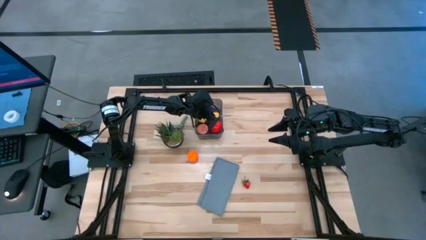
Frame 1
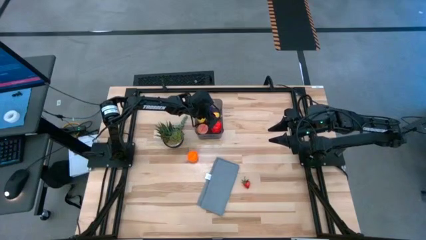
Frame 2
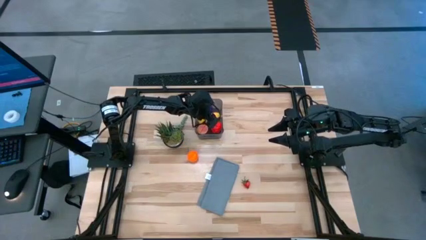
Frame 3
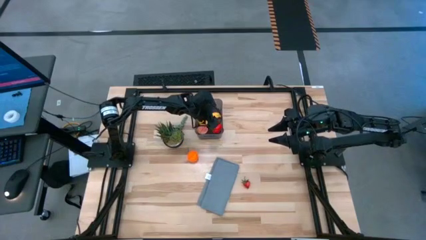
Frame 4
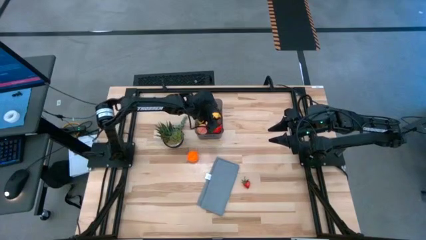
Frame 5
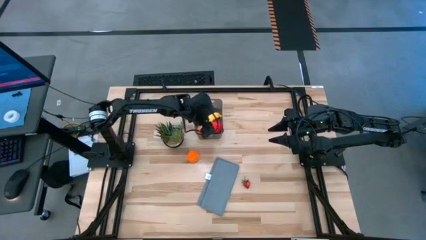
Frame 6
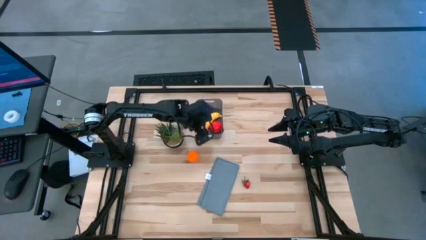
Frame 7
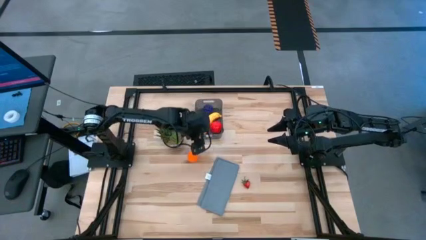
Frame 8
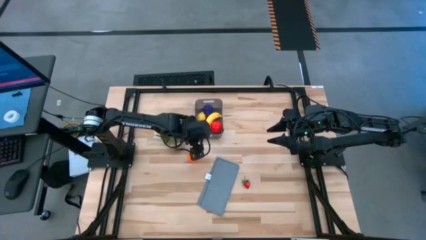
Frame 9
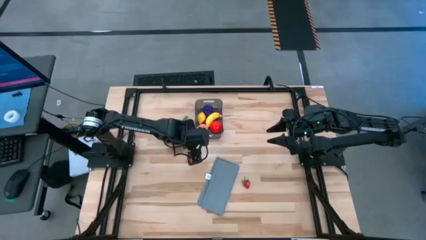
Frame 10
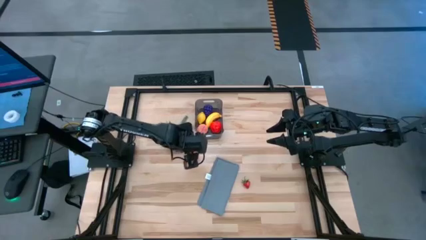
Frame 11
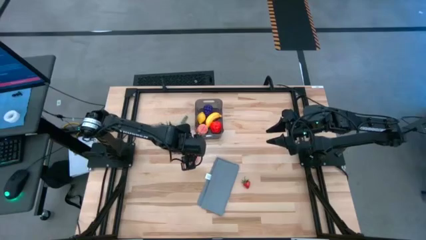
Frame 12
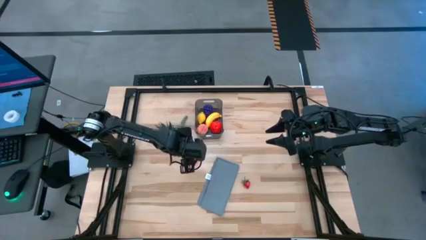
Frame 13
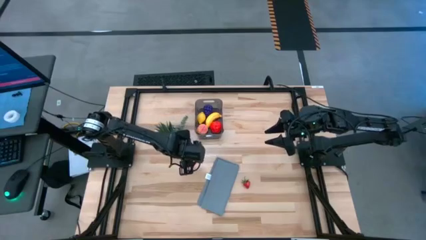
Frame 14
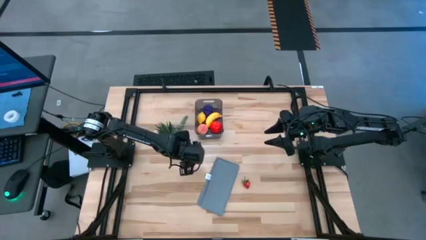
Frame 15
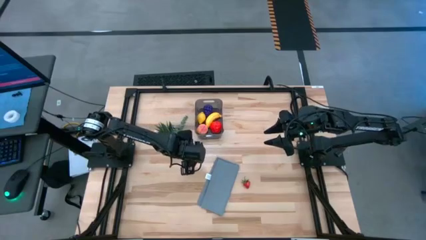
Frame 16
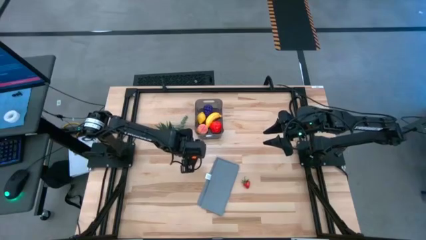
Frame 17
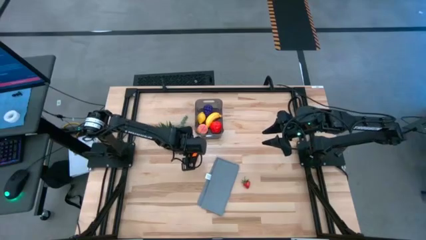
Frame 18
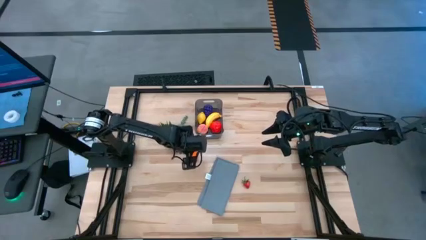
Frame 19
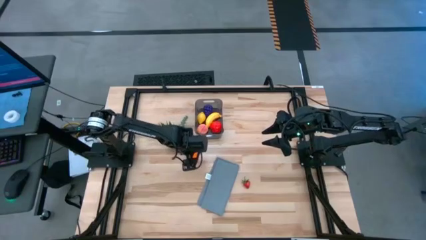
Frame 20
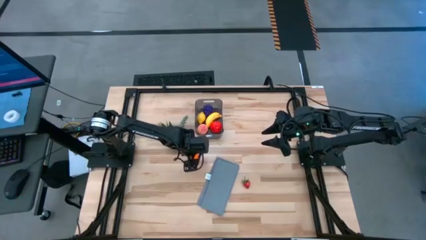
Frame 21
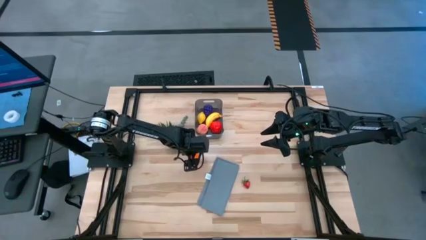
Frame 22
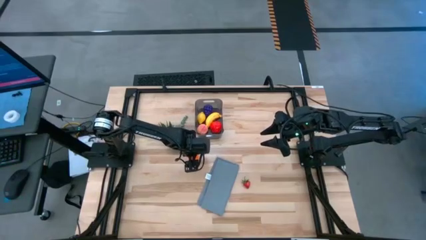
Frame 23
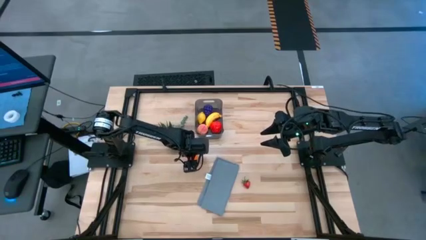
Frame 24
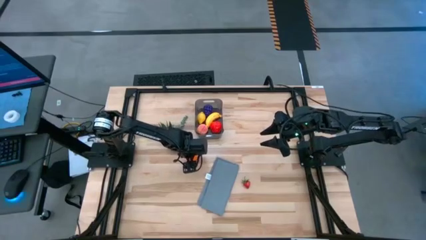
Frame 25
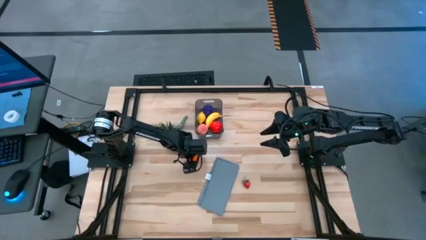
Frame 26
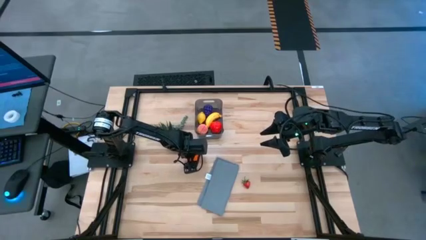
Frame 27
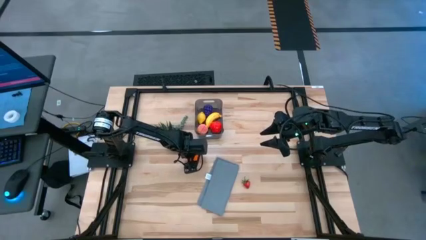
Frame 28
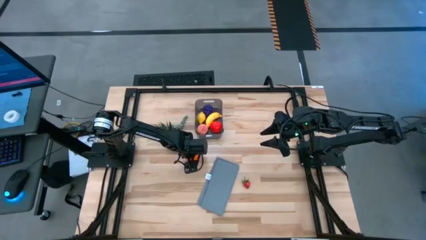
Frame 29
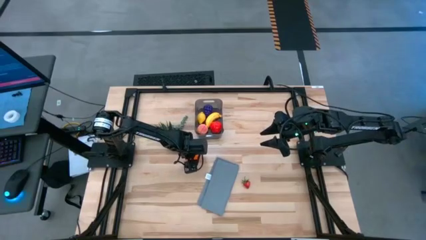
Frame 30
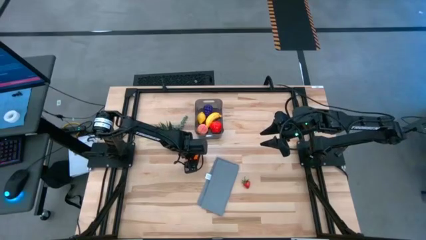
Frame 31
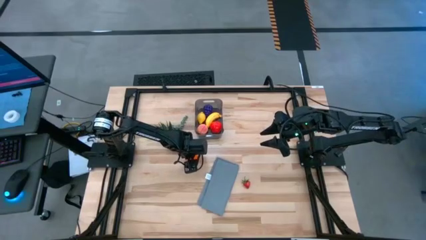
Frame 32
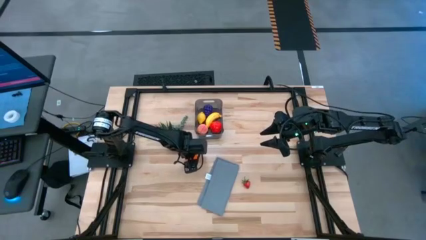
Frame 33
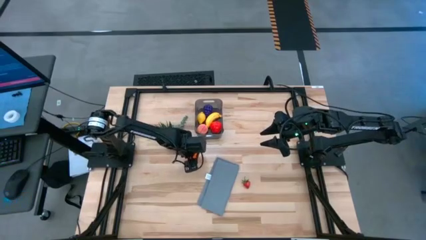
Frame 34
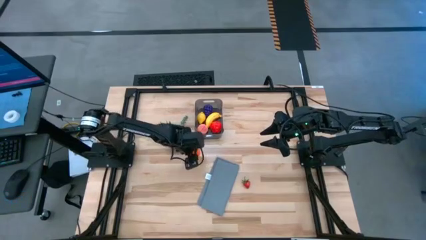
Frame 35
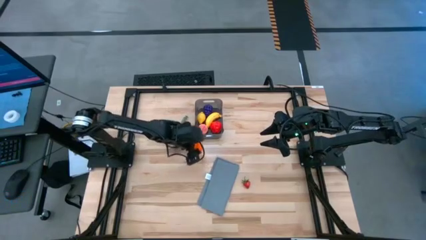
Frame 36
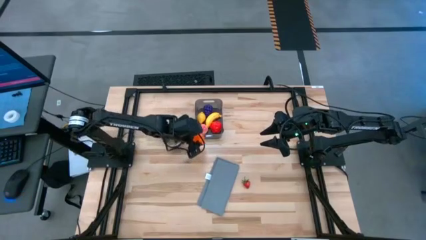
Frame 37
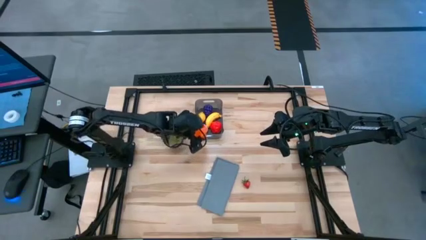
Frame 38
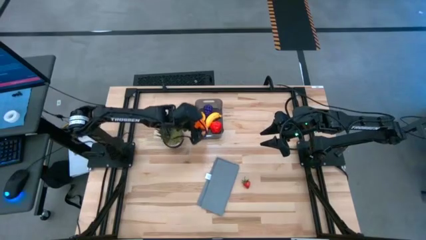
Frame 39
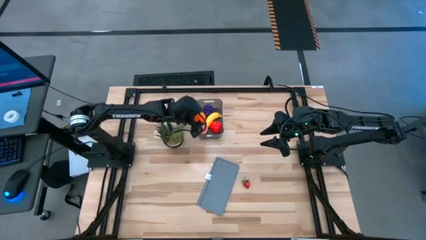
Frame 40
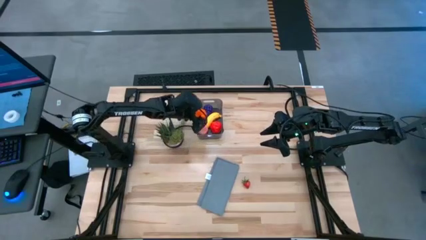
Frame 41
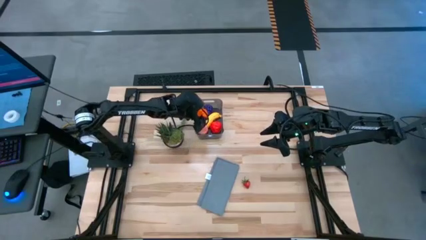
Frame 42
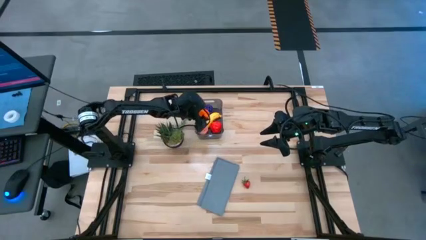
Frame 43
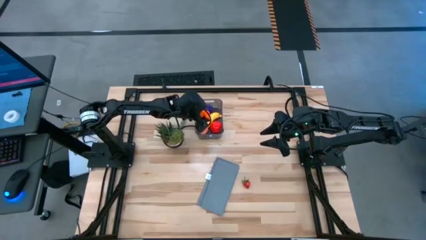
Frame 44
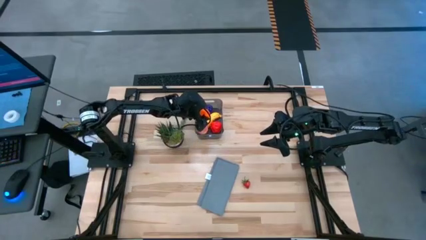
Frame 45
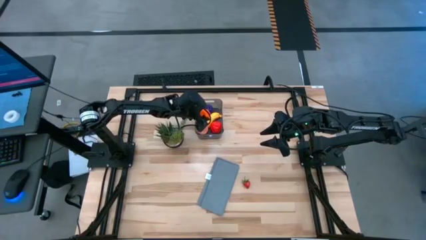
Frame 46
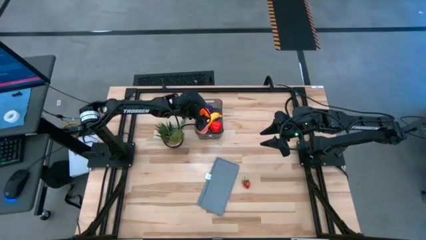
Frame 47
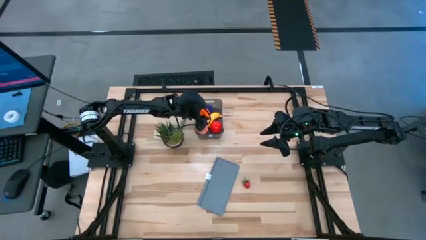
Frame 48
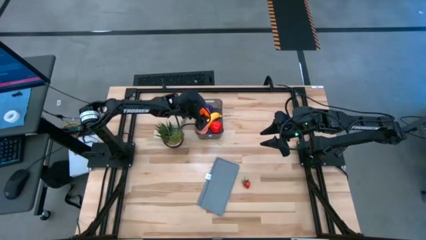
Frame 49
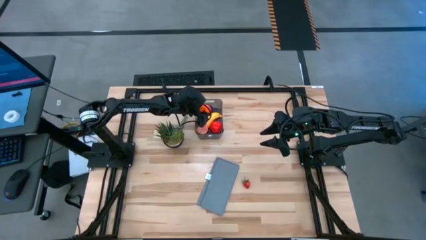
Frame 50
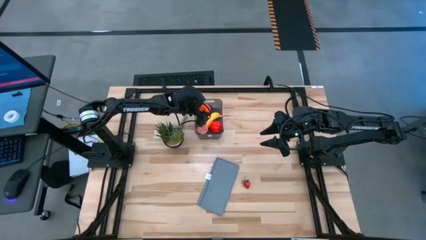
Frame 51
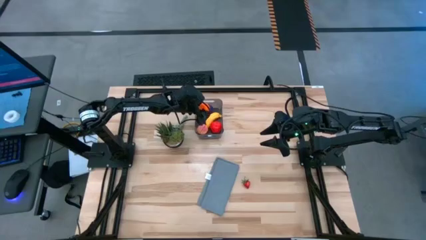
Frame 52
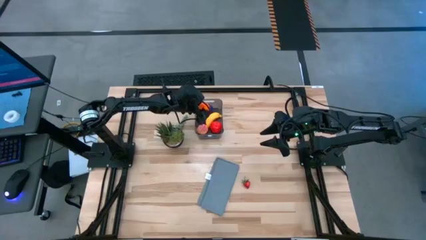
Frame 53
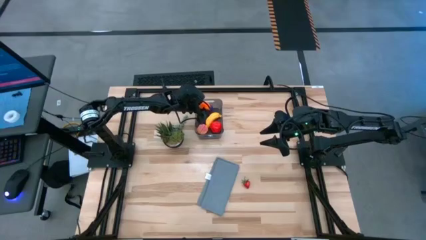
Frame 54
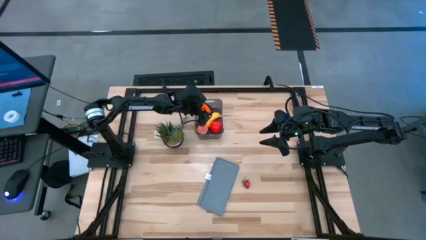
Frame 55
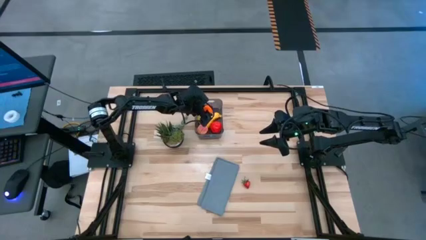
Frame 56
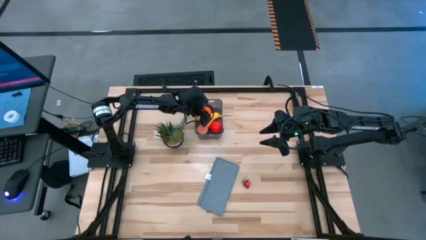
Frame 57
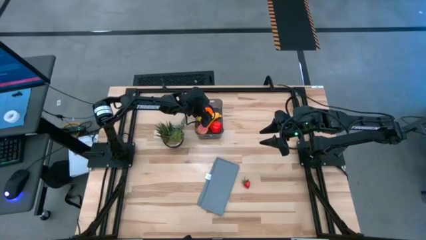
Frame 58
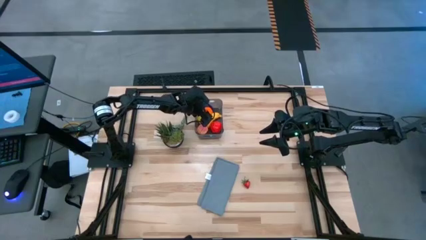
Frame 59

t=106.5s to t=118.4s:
Task: Pick and placing Produce into tupperware
Put the orange pumpkin into the black bin
